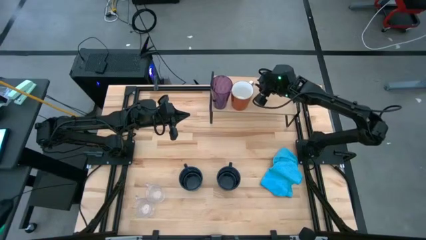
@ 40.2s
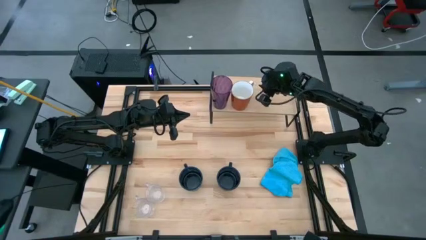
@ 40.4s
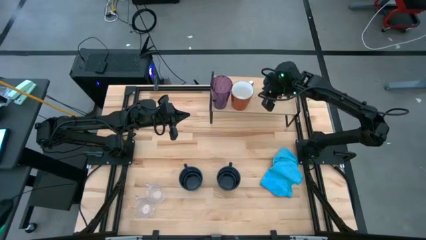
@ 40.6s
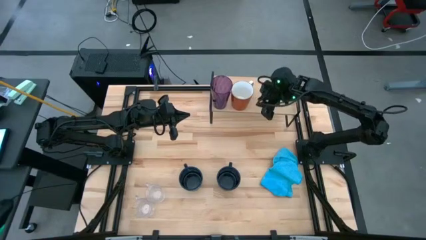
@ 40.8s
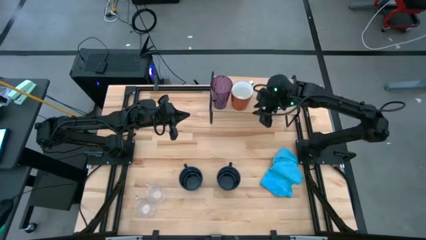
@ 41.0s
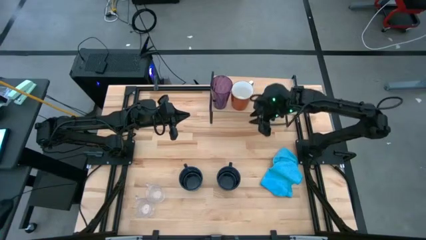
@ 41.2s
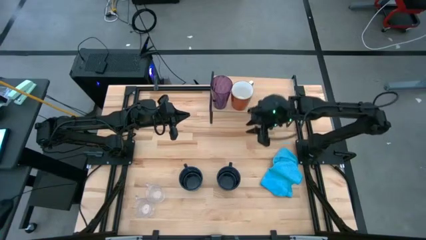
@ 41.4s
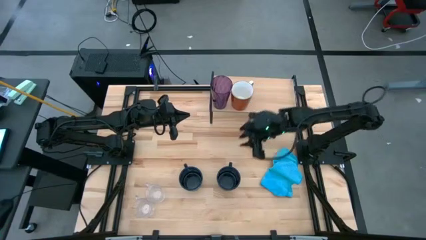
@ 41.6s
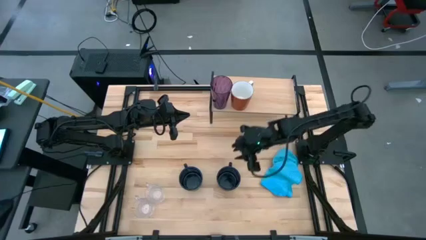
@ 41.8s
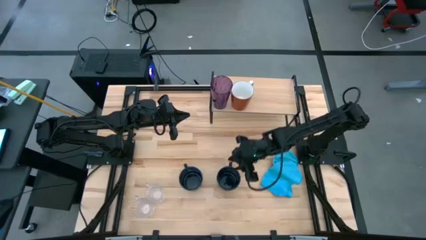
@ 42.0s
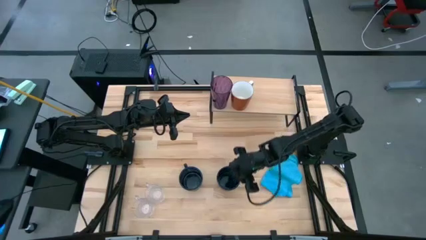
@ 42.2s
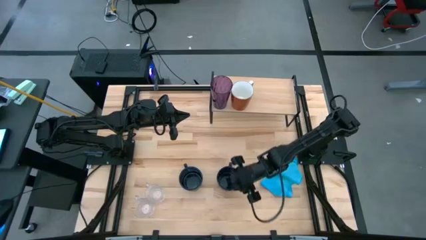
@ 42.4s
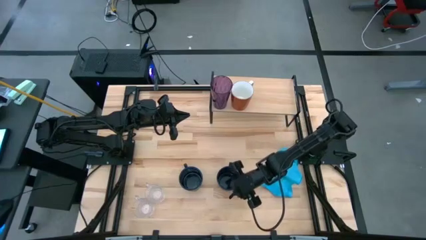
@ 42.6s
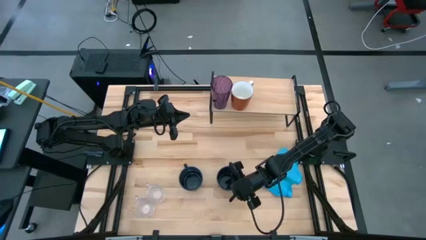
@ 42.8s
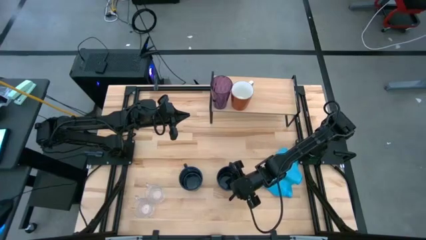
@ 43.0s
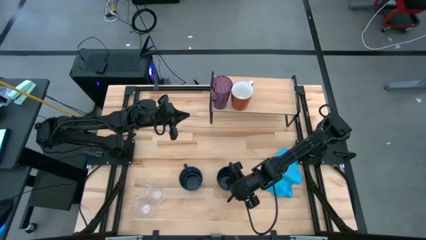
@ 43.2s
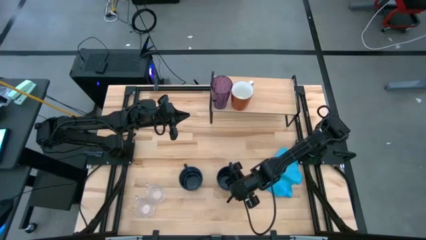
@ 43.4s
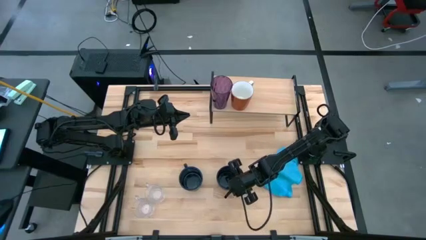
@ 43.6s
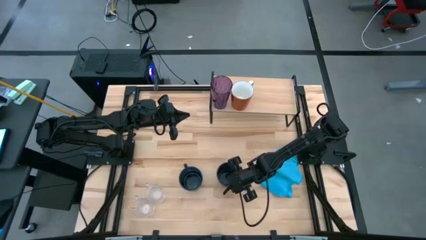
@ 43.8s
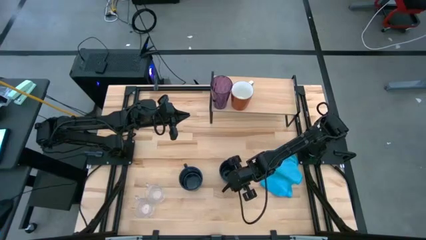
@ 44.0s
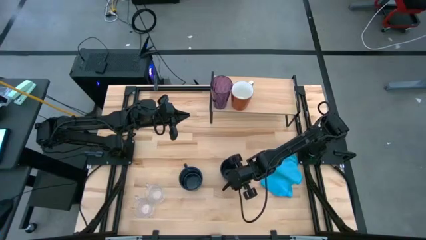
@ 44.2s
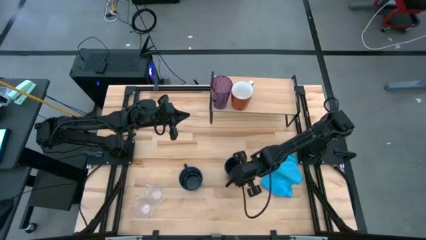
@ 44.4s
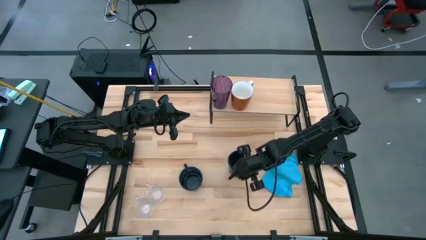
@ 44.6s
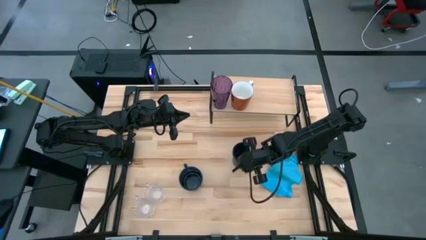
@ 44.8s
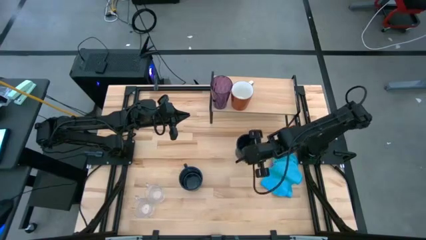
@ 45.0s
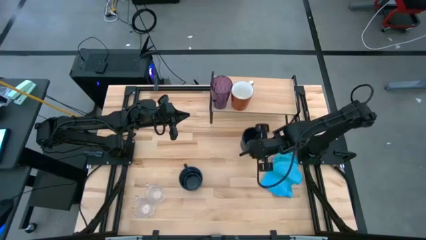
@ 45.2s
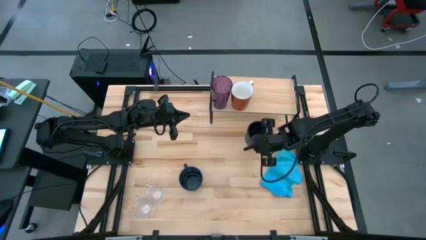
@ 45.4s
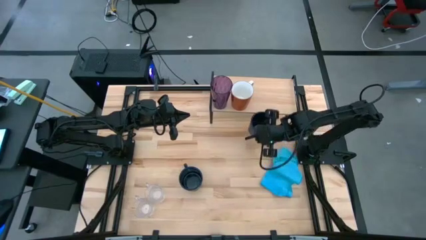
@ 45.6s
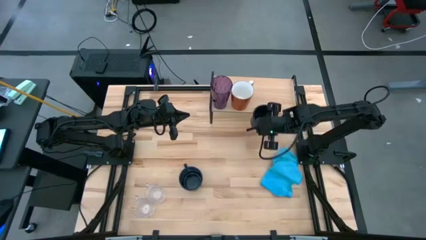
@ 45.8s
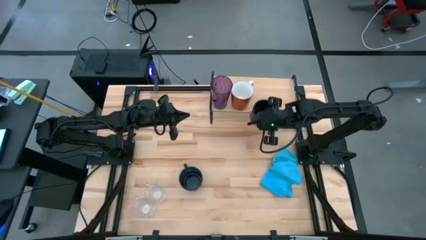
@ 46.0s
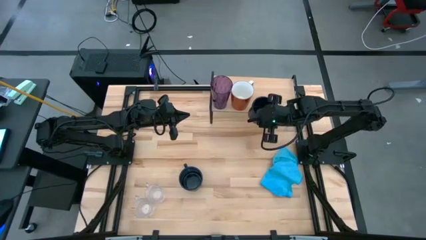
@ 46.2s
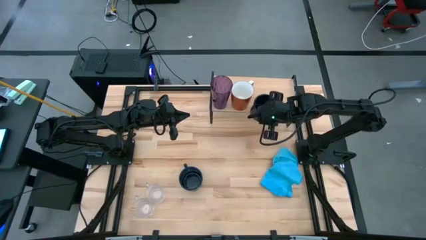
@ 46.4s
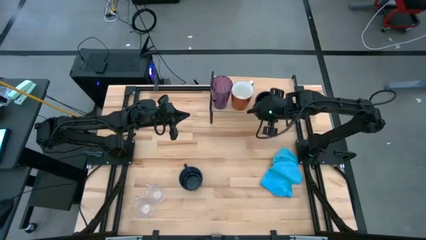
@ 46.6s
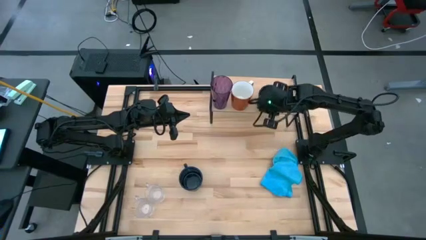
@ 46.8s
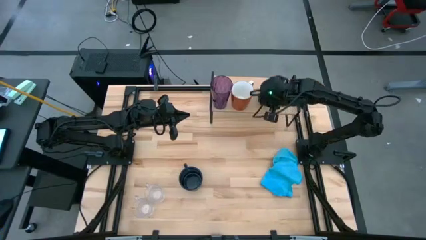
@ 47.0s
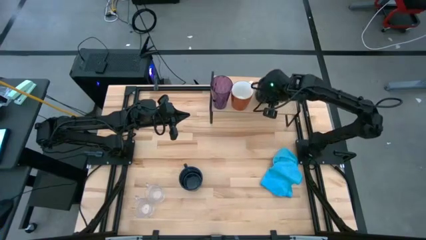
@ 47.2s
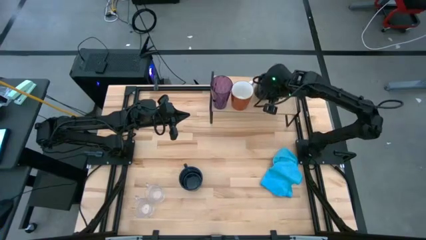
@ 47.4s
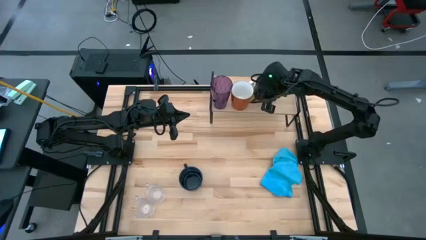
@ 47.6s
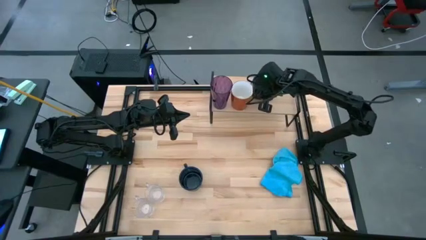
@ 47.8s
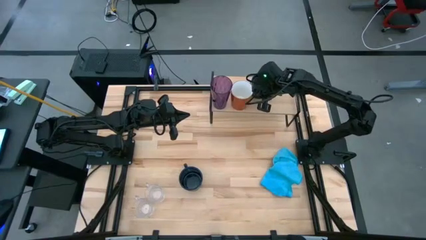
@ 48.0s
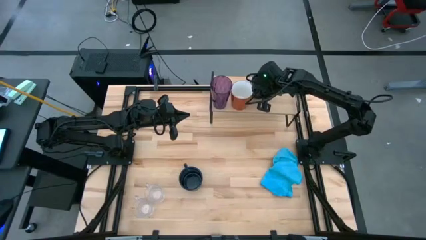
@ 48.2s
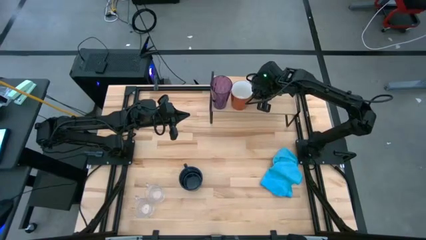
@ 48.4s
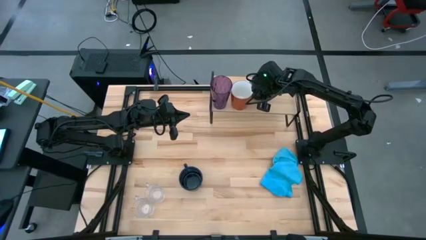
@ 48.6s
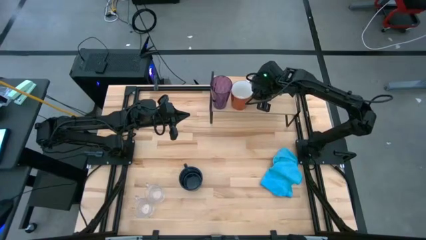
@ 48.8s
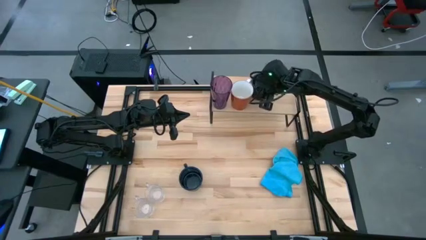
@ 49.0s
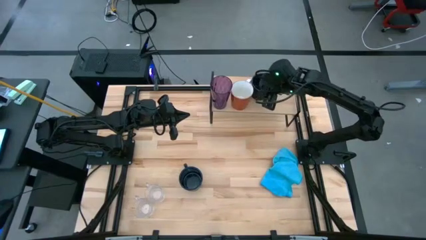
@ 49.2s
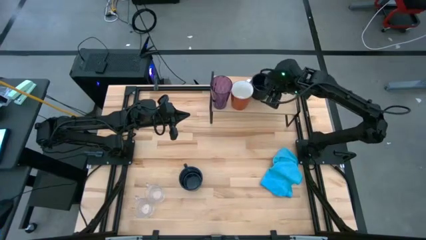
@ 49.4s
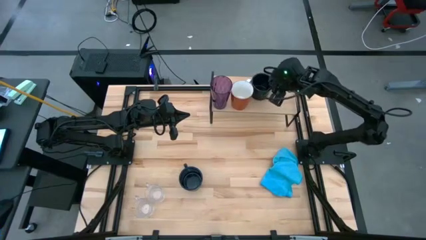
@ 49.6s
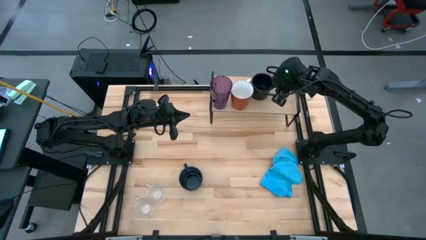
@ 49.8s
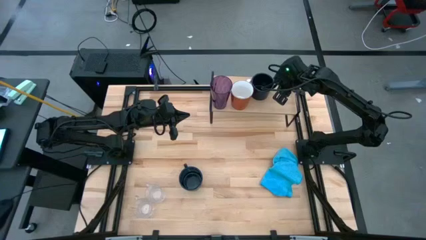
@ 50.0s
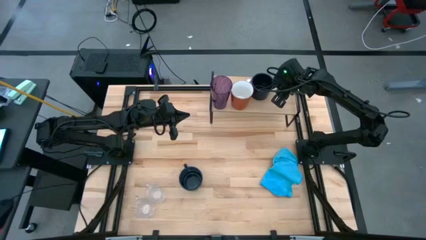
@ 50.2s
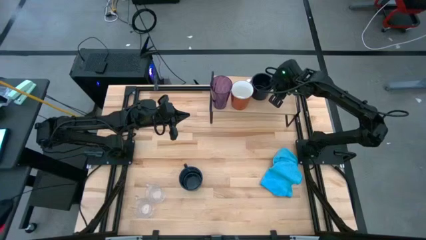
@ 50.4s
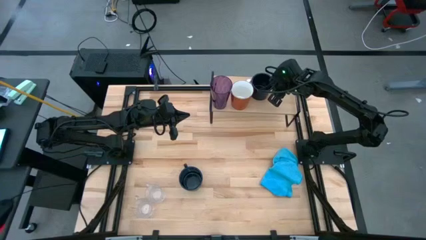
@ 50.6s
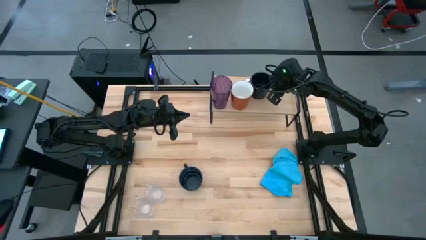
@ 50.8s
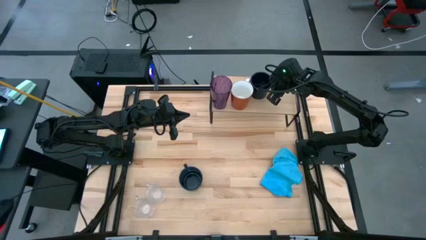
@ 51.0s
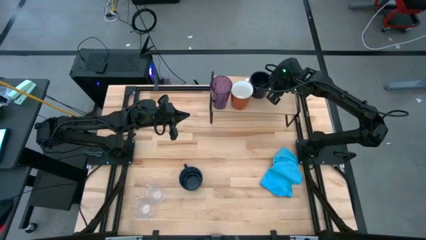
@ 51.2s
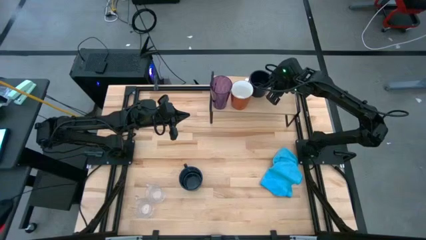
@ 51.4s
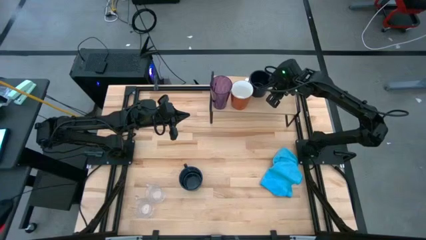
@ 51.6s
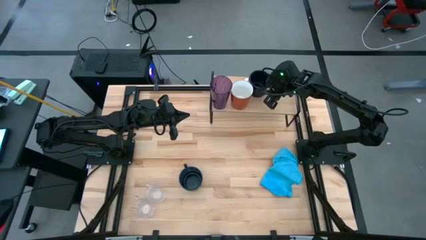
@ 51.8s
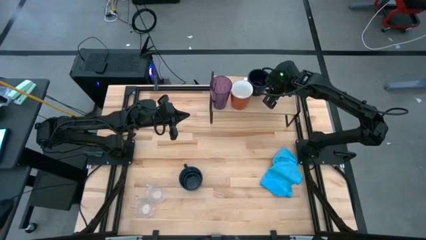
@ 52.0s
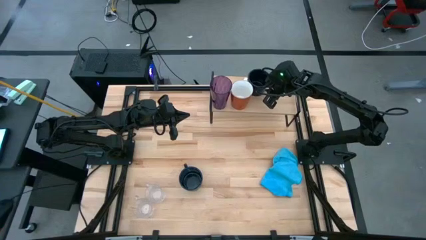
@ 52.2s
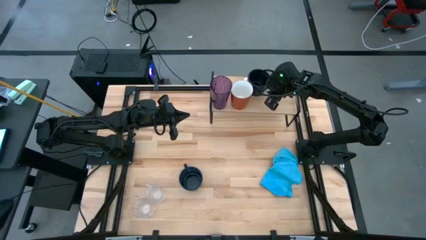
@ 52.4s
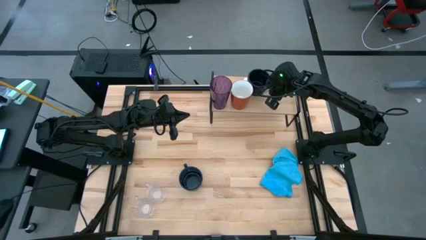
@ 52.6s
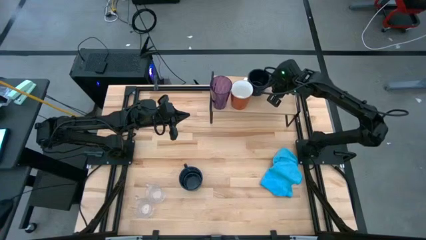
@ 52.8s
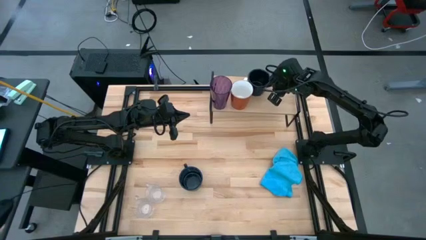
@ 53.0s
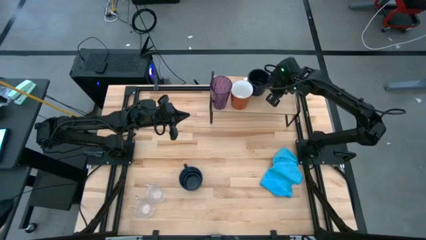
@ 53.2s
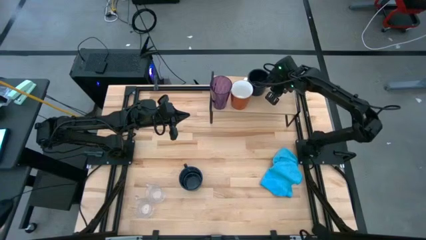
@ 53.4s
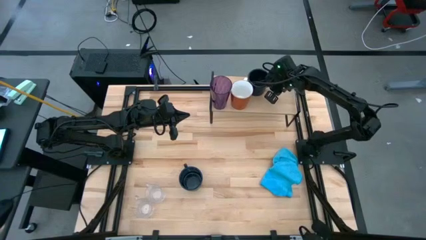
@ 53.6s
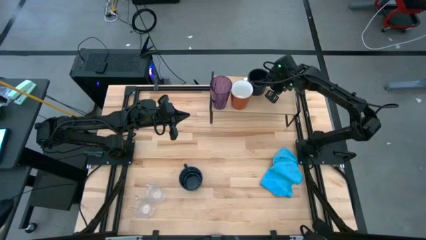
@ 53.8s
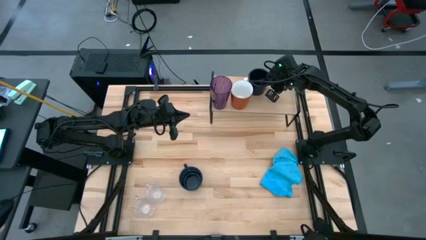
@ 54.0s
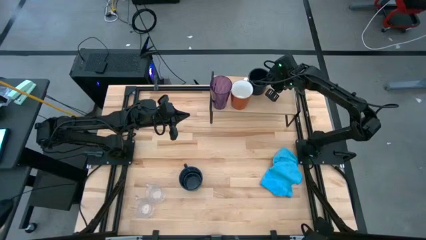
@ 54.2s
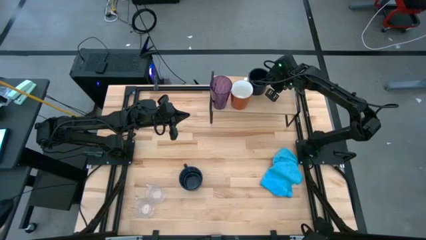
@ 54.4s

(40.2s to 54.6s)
Task: Stack small to large cups/mugs on shelf
Put the right black mug on the shelf

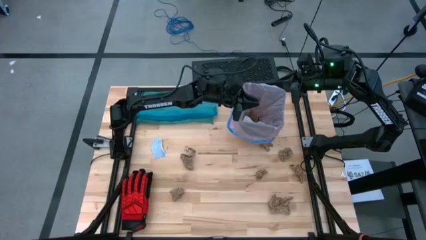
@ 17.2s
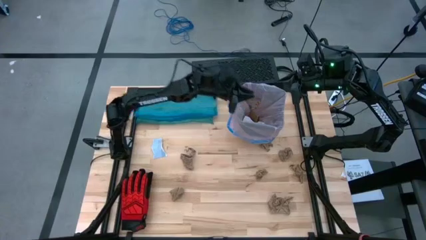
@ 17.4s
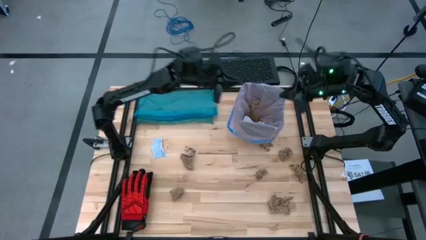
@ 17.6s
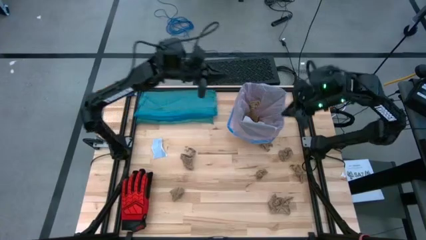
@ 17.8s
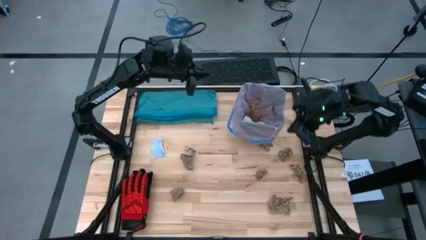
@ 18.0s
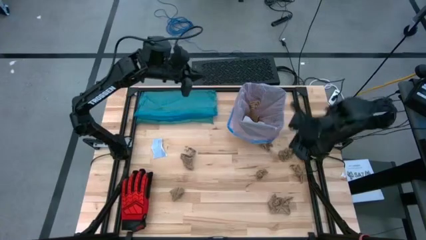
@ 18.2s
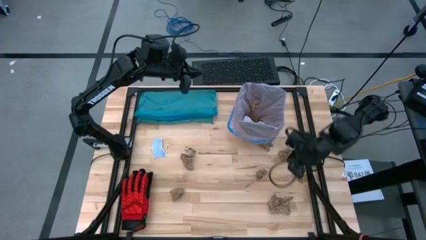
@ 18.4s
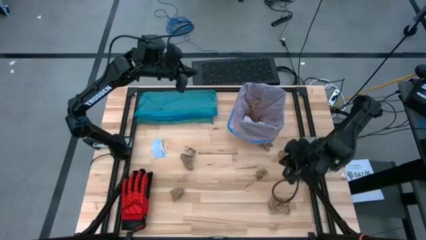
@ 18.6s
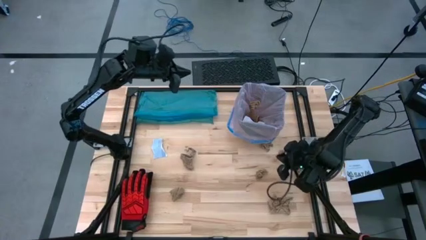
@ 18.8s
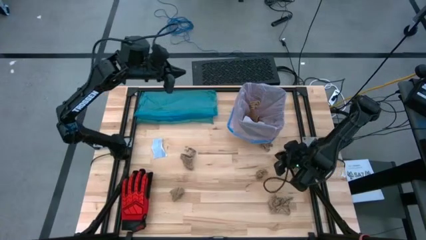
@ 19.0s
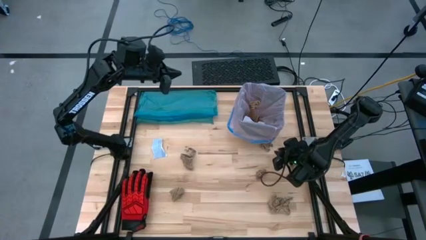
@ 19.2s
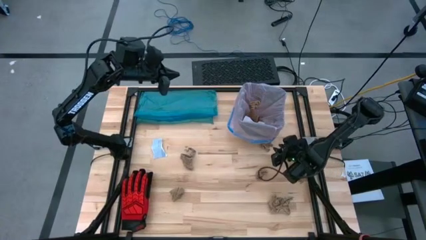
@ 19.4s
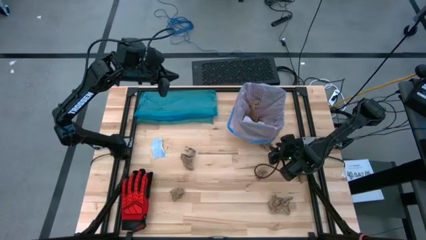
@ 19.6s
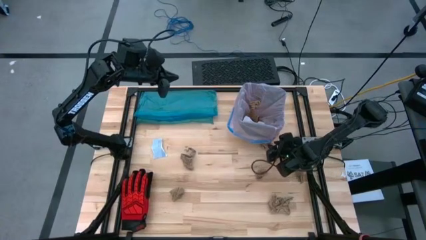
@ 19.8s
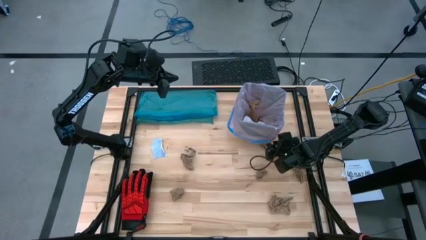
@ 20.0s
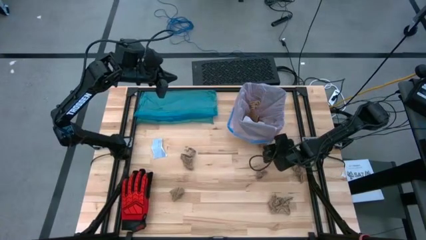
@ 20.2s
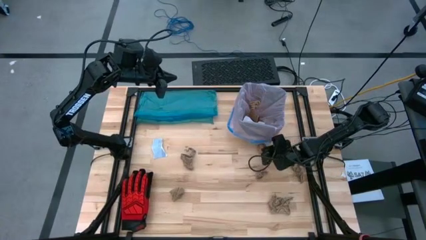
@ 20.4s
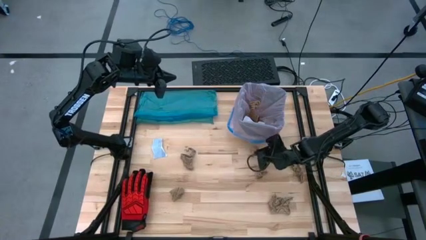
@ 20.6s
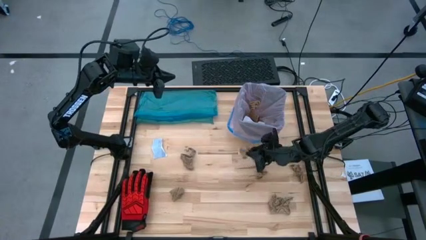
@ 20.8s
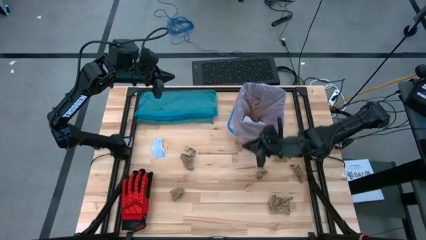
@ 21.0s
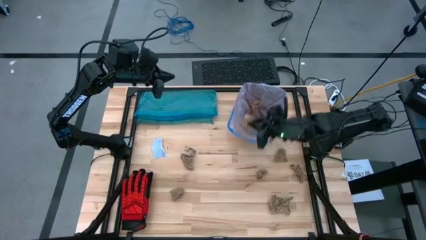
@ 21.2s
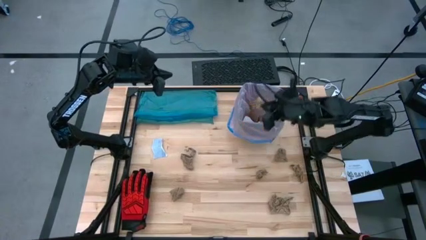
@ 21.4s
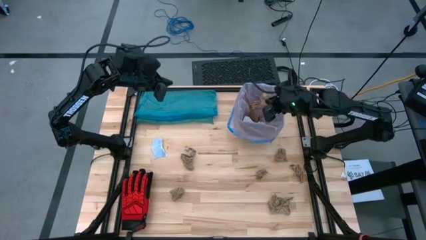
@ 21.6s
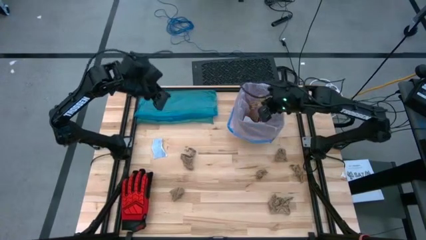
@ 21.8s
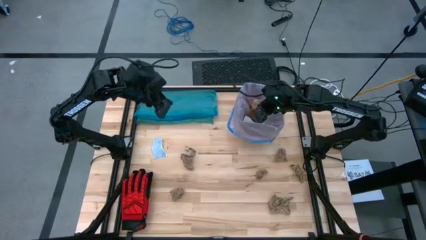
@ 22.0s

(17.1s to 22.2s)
Task: place trash/remove bag and relplace
Put the brown napkin into the trash bin
